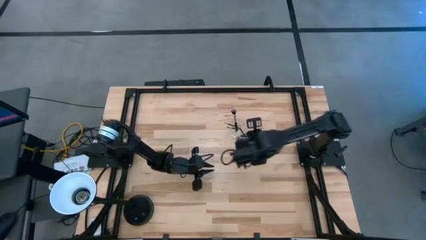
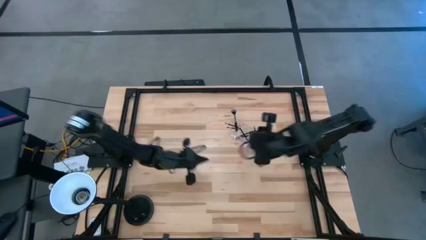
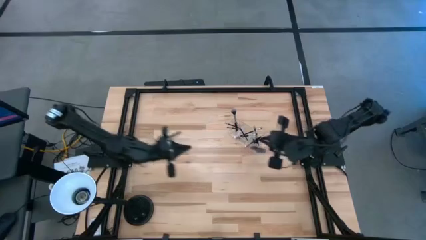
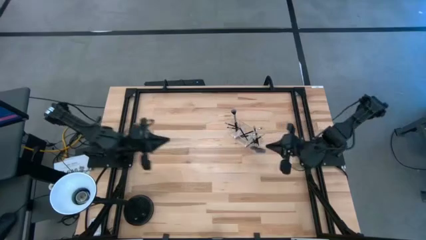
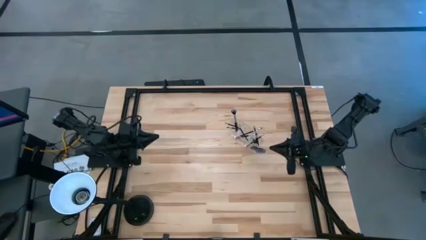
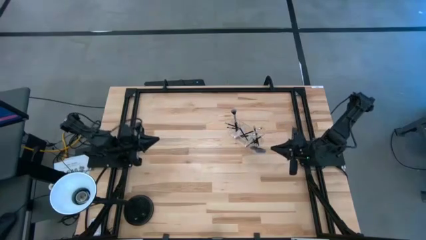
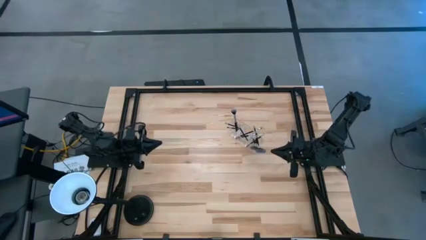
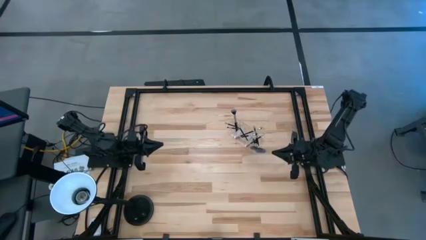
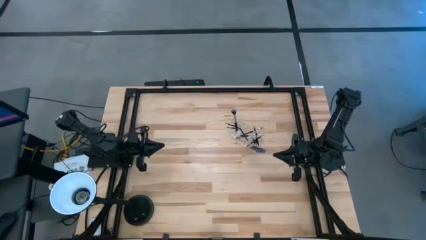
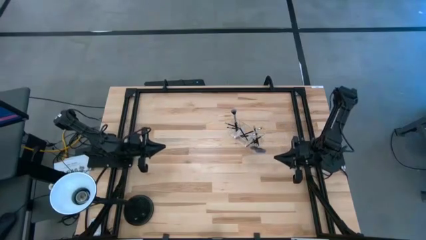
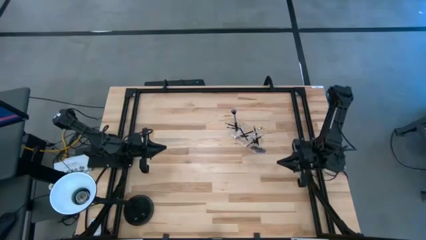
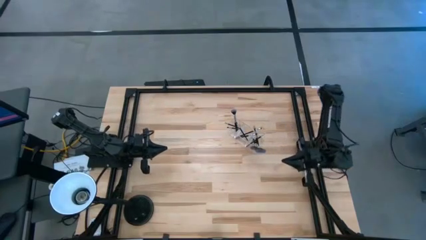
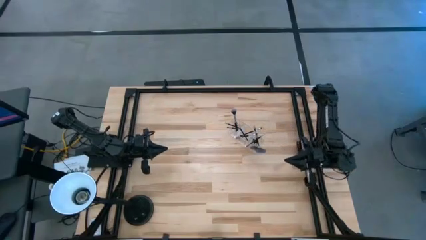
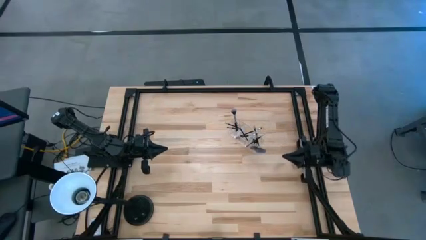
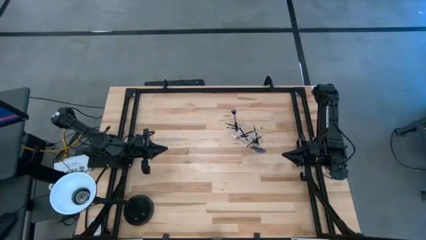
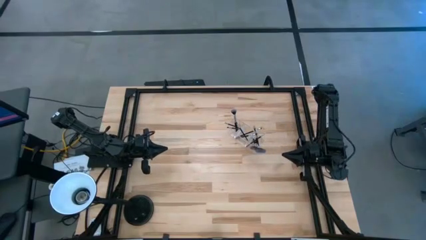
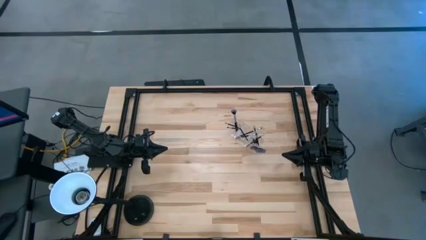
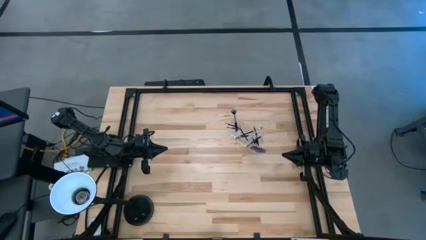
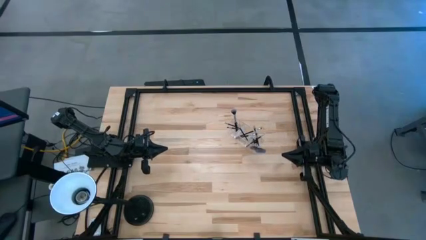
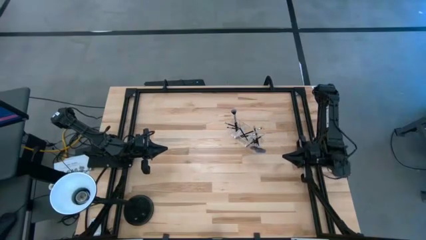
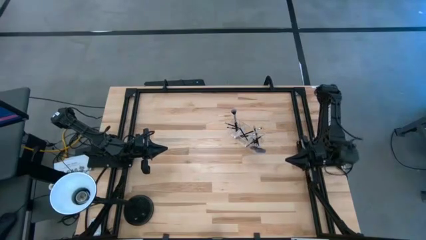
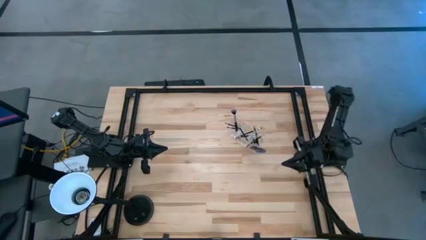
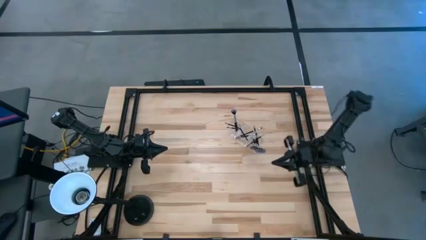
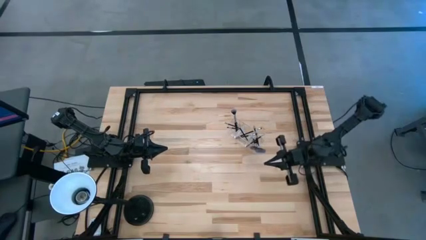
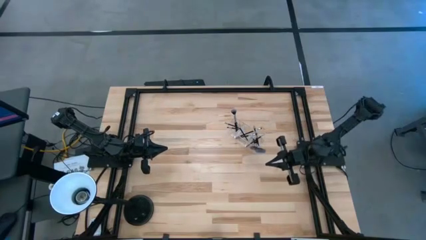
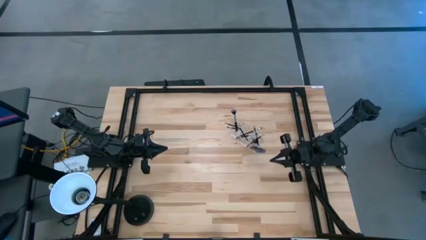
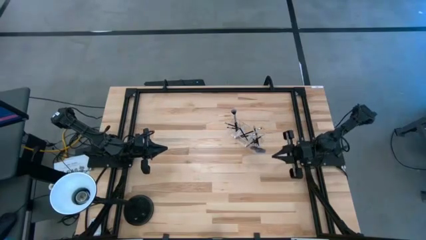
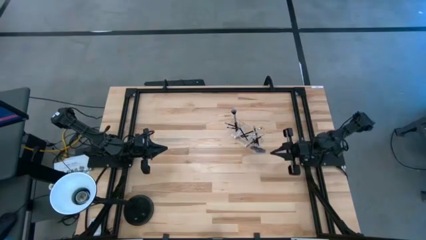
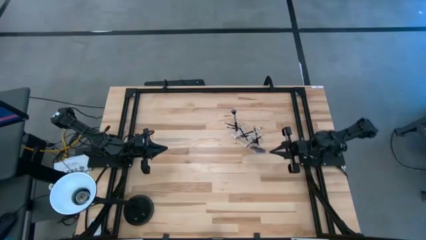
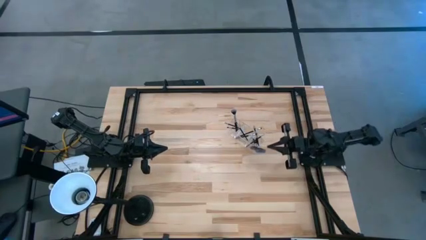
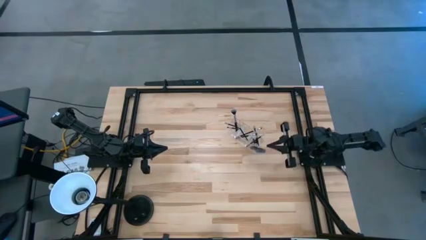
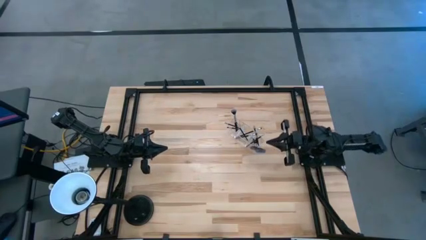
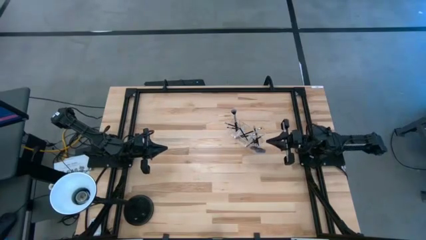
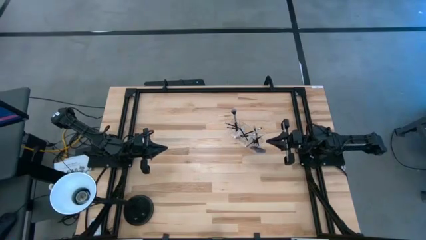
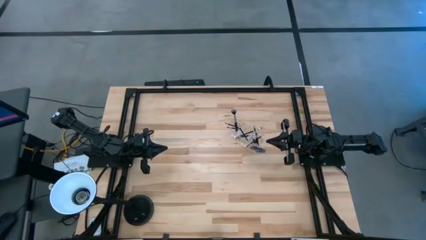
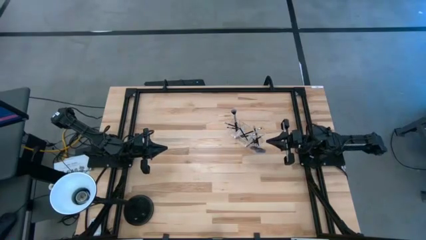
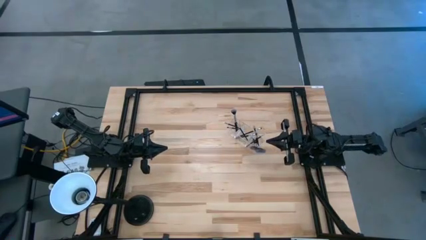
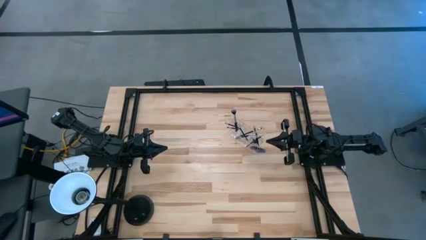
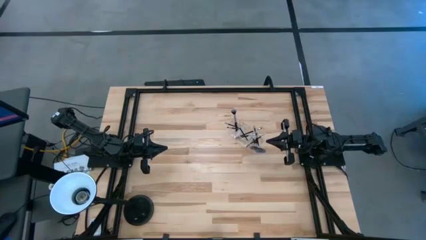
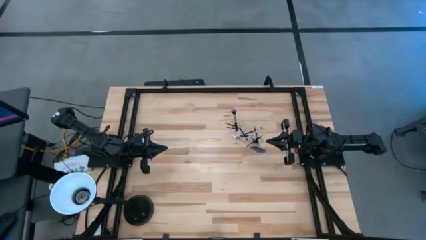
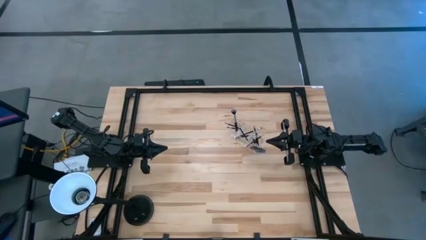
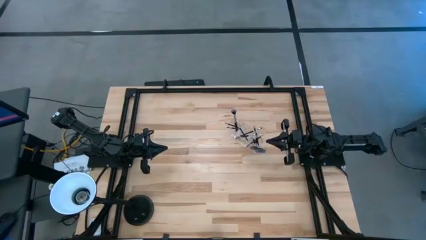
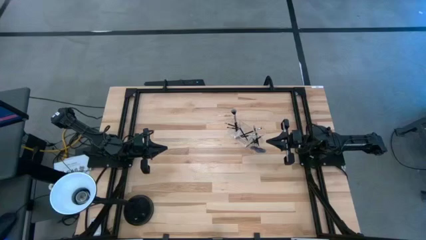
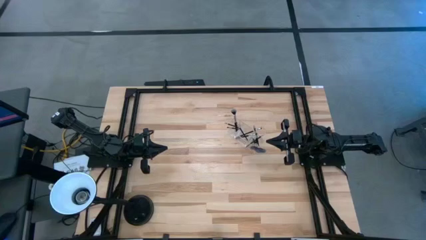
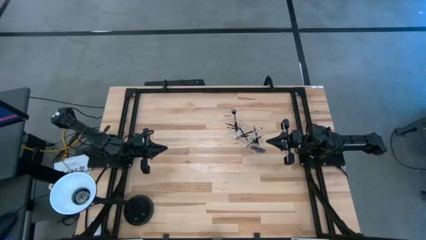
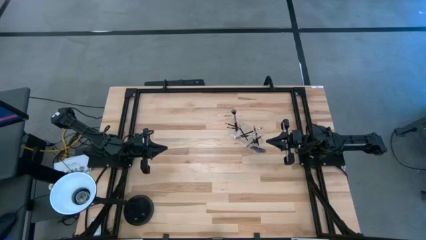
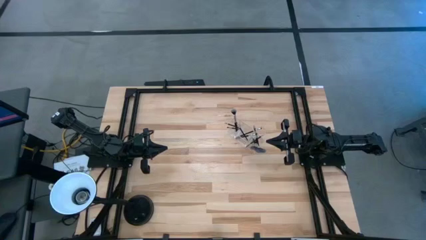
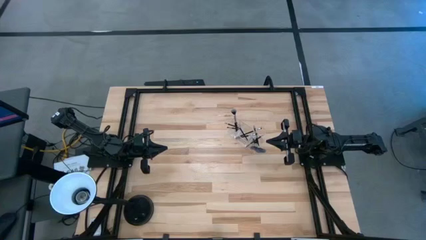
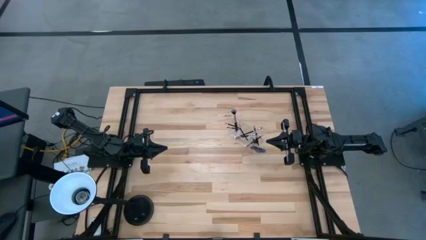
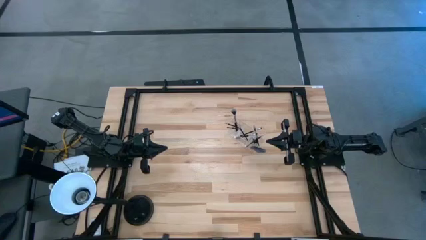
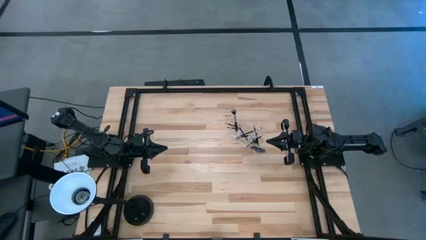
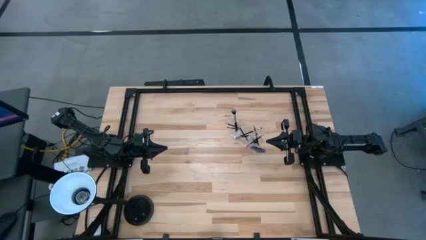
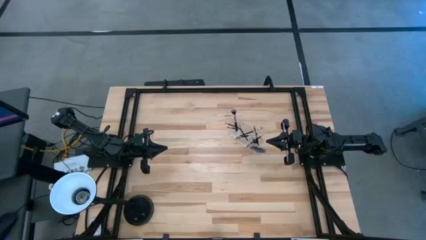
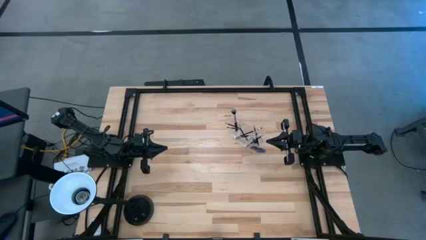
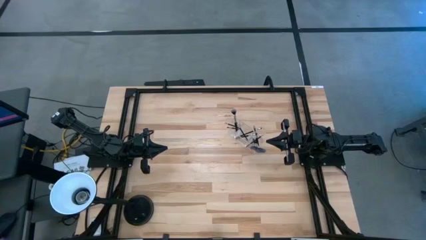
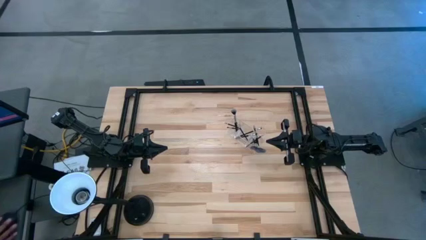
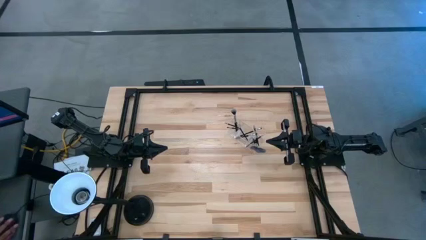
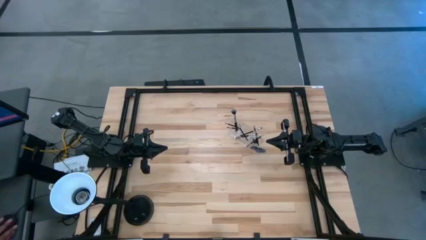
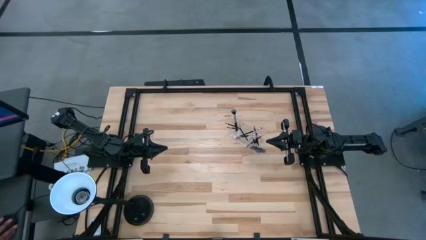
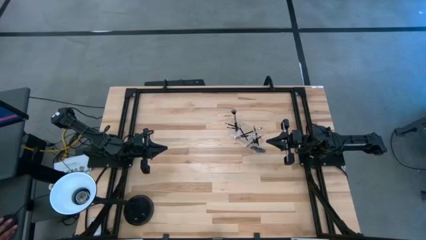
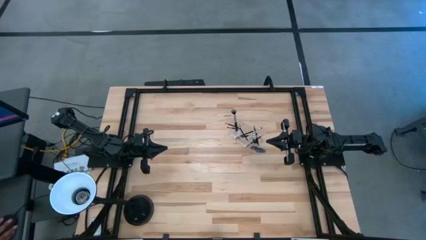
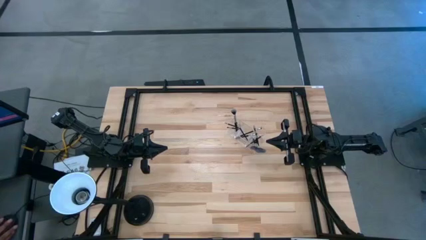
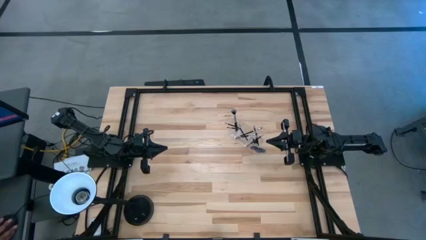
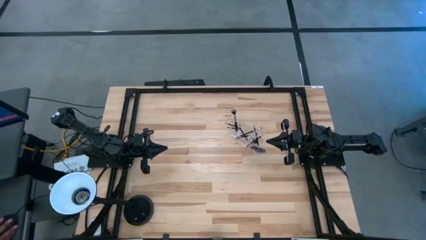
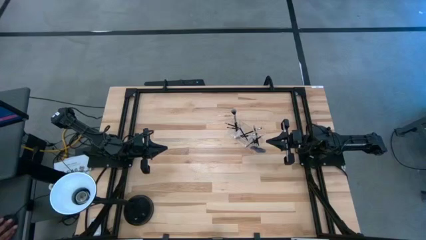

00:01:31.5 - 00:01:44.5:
Task: Put items in baskets/containers
Return to Home Position
